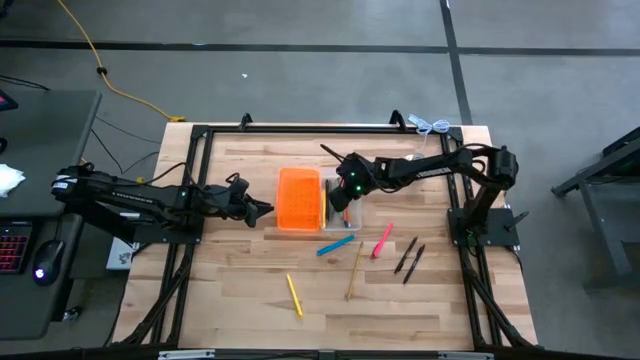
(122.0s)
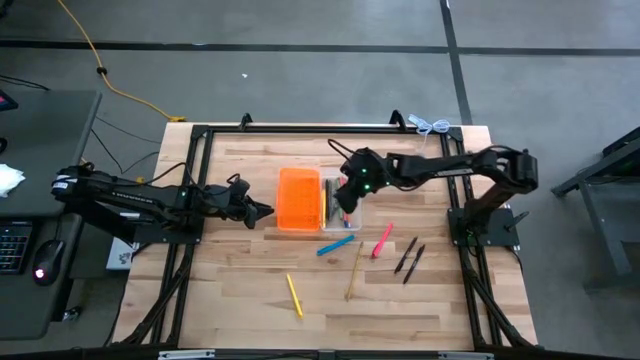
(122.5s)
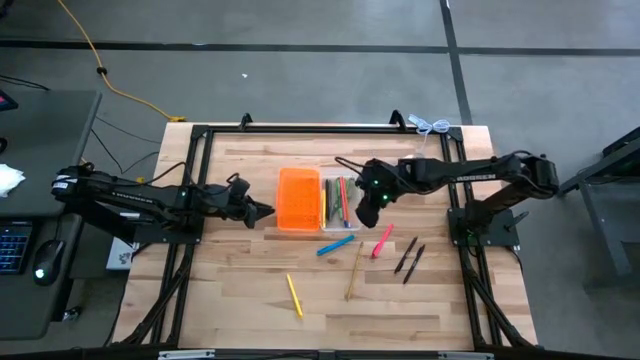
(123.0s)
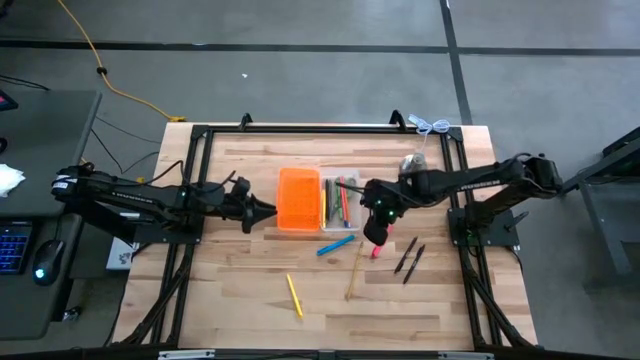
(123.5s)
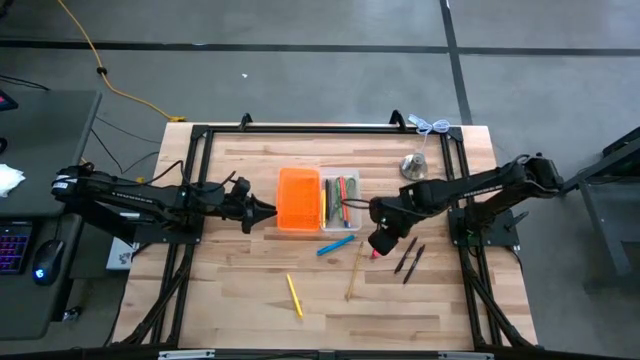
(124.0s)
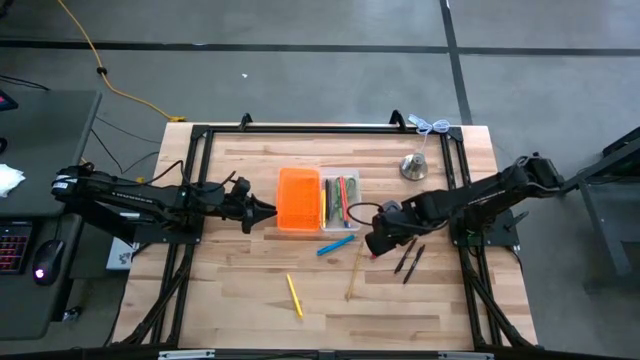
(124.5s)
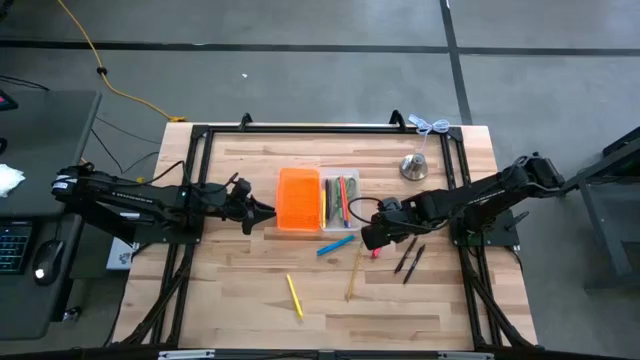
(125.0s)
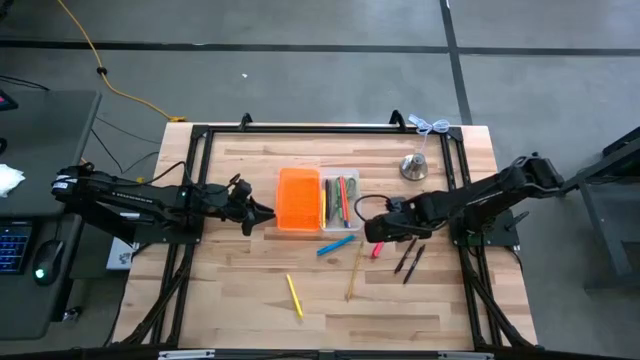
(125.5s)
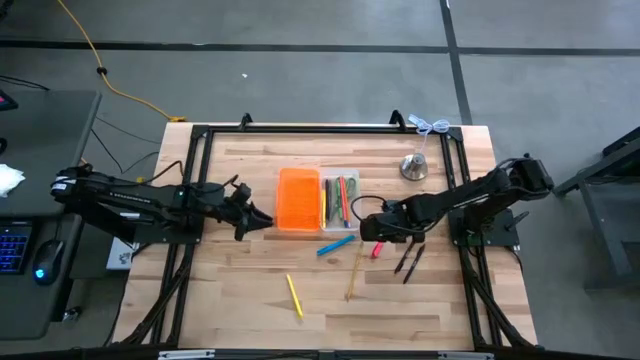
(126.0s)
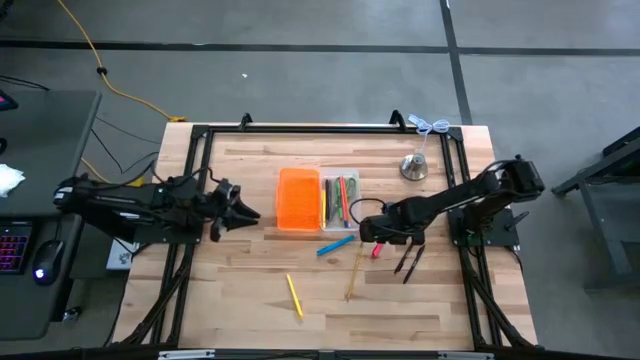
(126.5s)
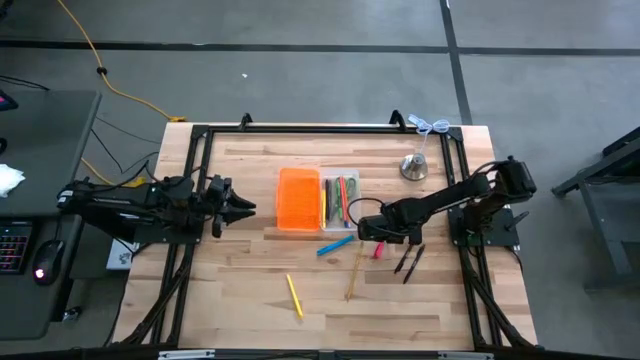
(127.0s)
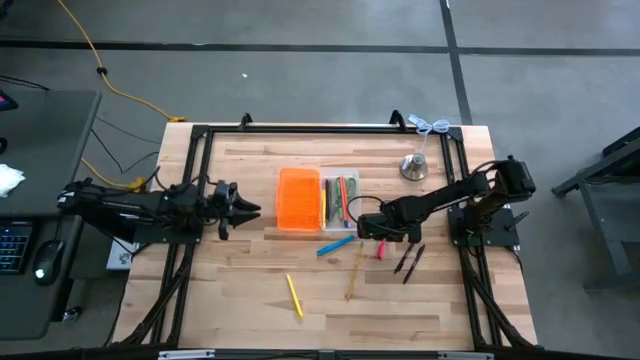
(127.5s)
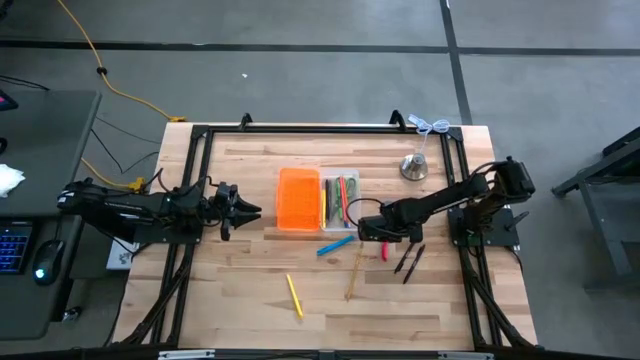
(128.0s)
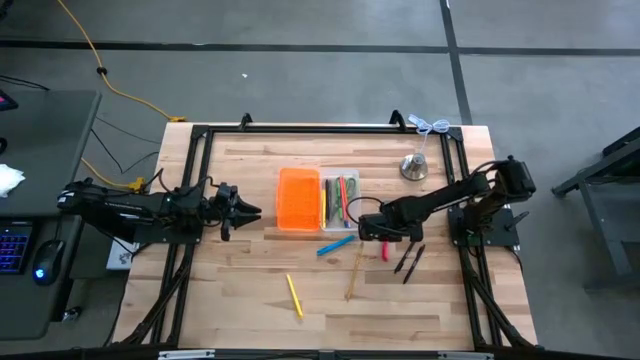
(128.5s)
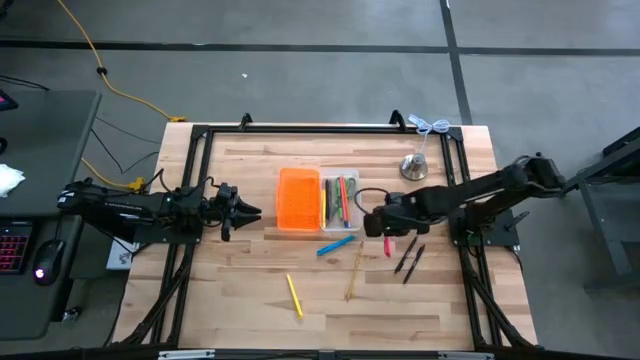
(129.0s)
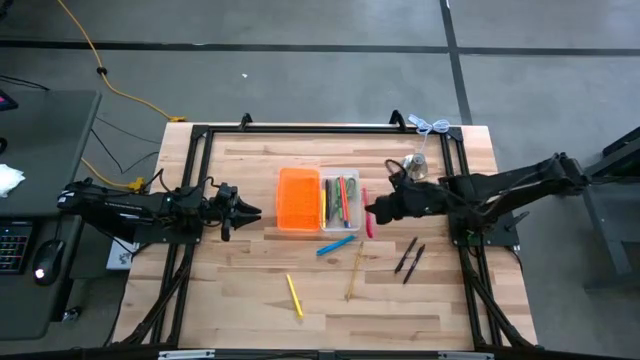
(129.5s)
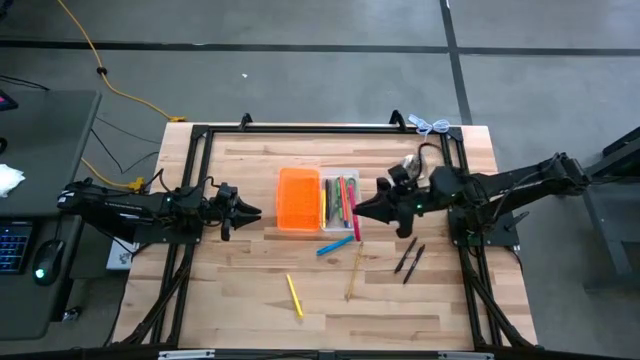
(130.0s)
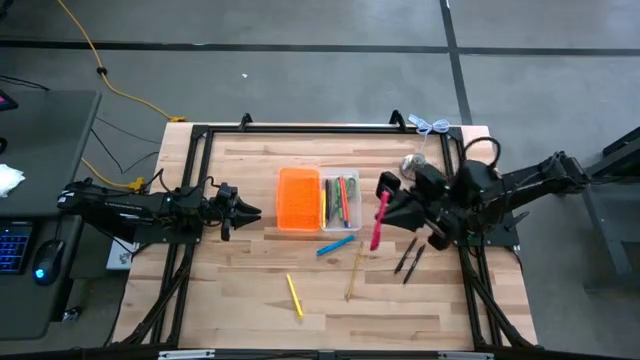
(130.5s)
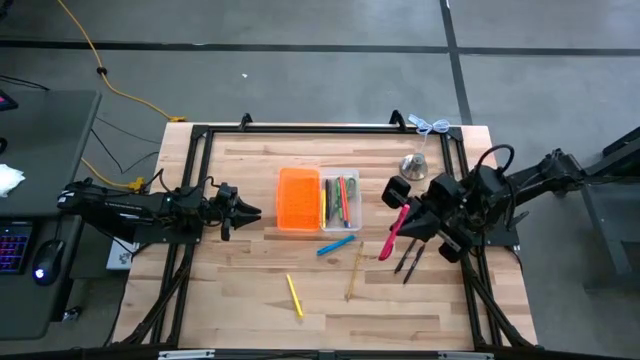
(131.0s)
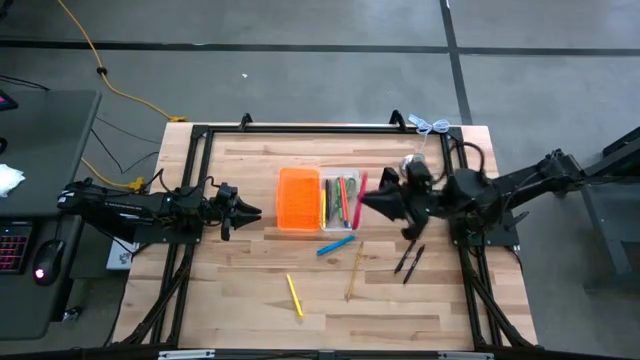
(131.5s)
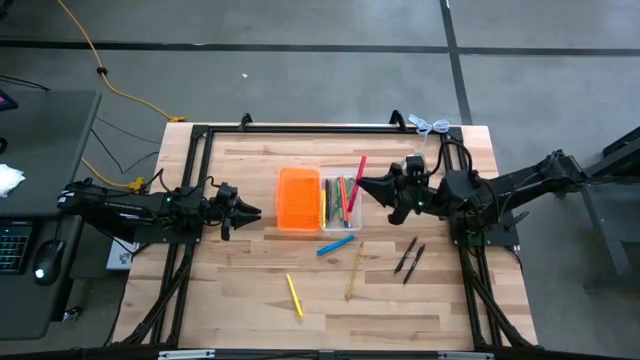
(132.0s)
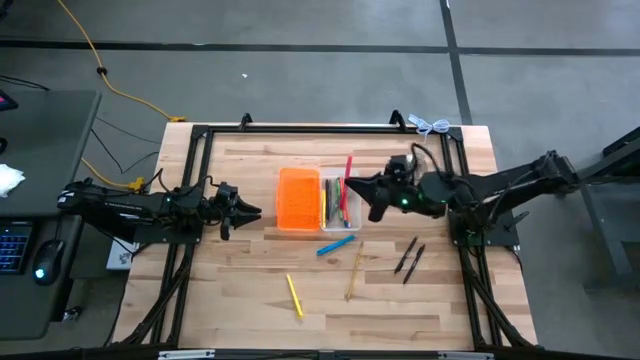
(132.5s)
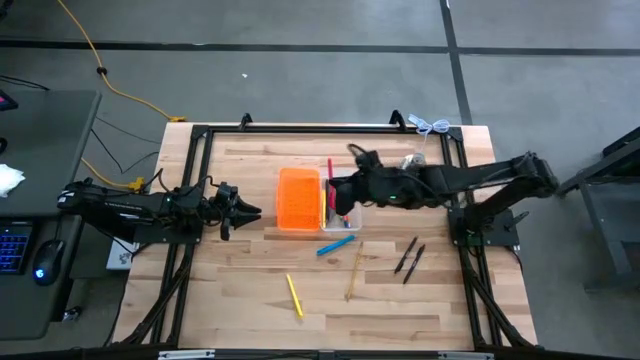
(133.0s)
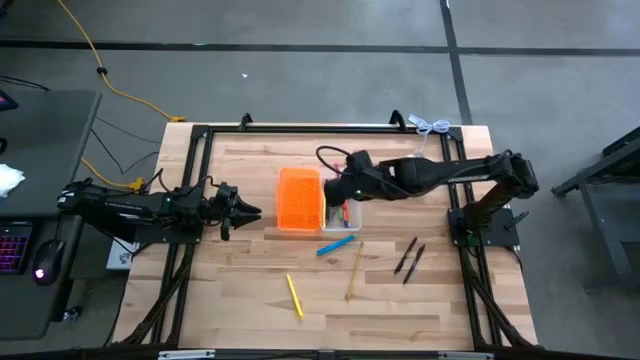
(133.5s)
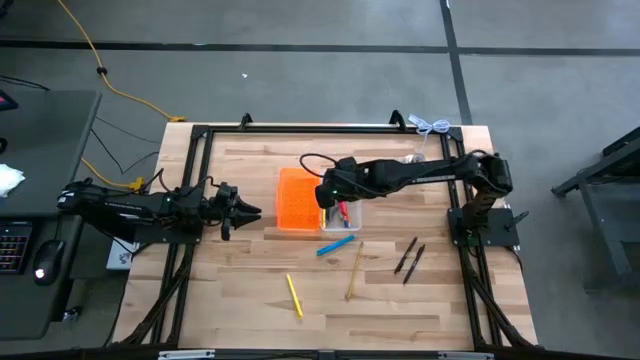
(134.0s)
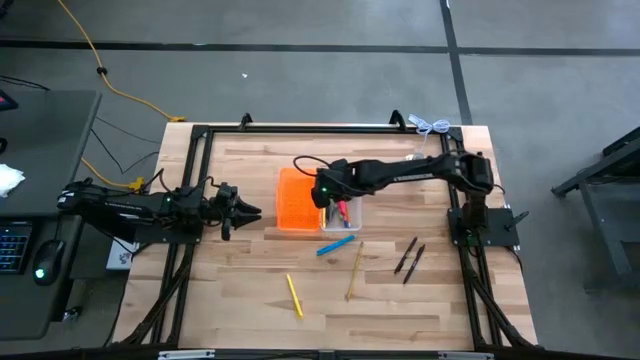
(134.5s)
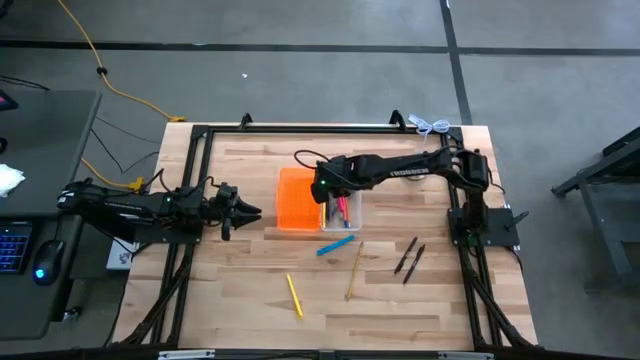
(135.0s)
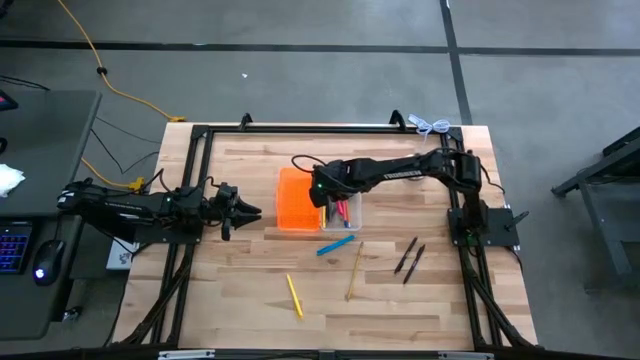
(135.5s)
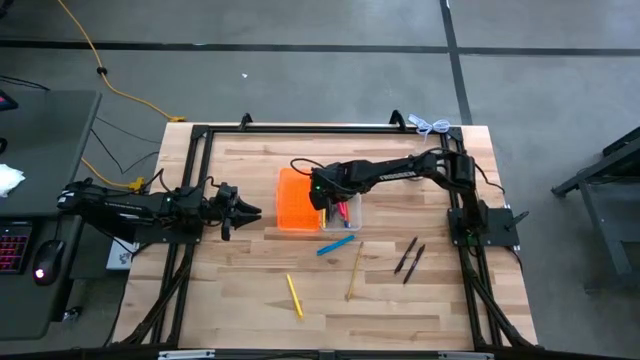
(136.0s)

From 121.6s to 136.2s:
Task: Pick & place school supplies into a supply box
Put the pink pen into the supply box

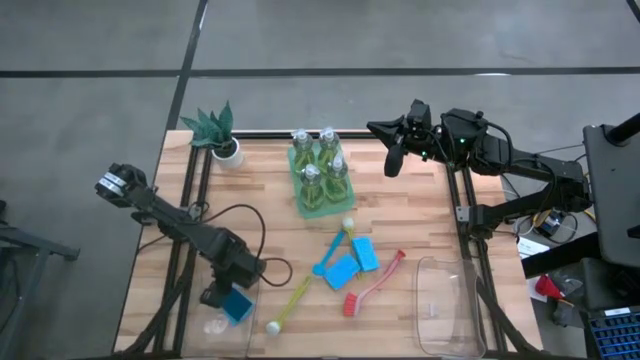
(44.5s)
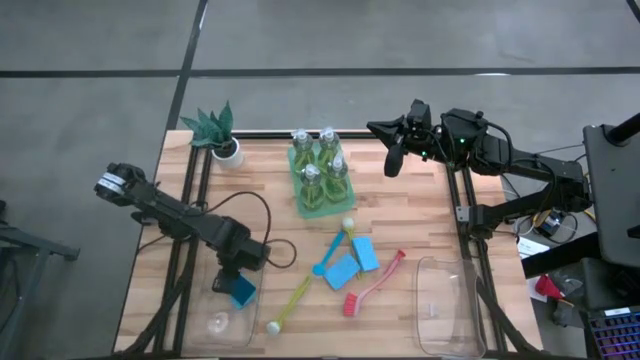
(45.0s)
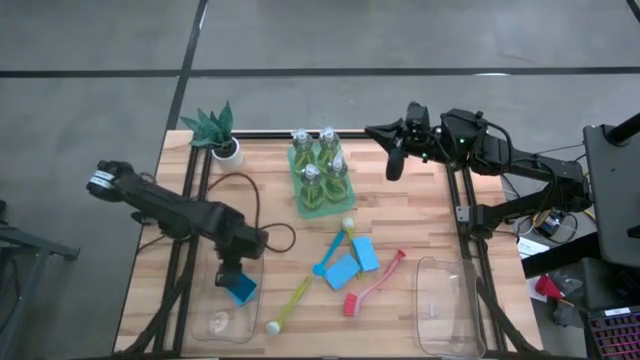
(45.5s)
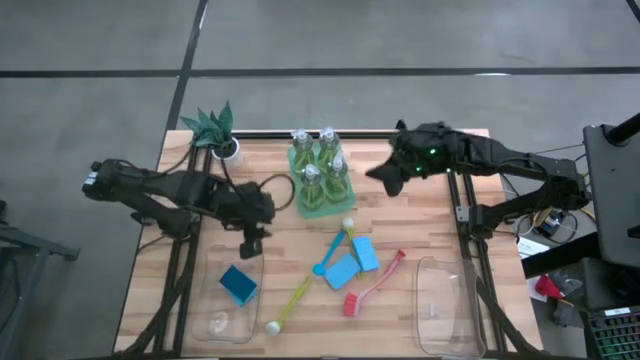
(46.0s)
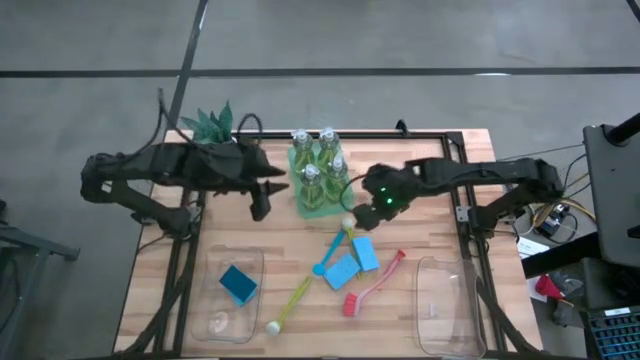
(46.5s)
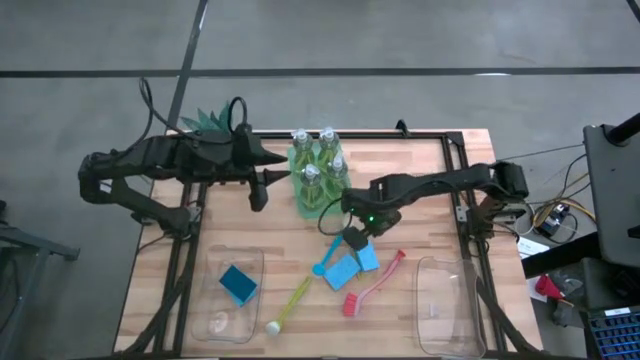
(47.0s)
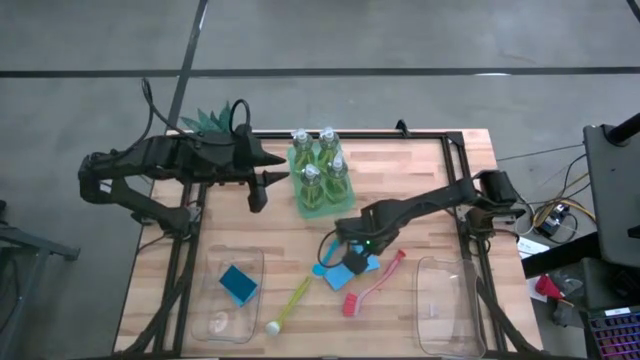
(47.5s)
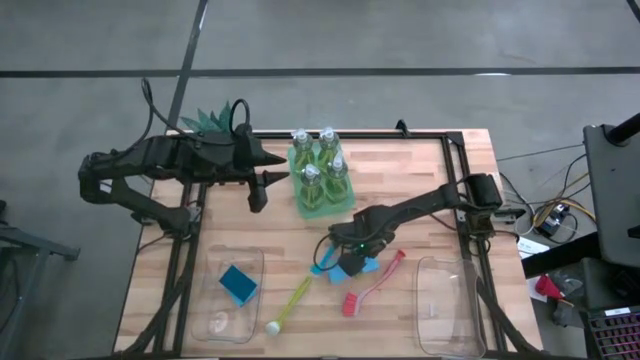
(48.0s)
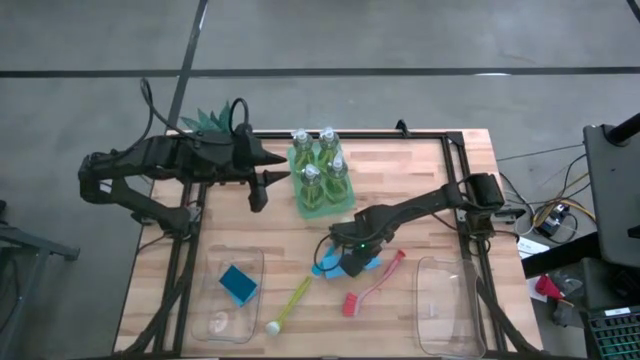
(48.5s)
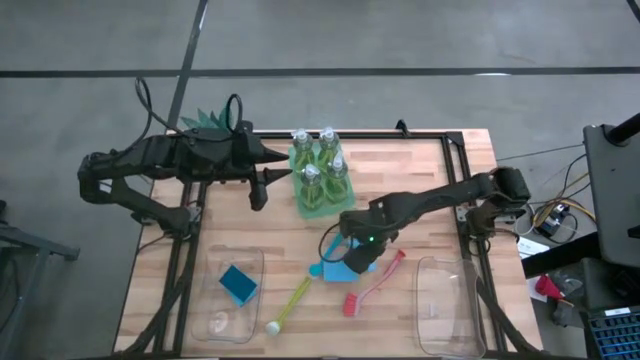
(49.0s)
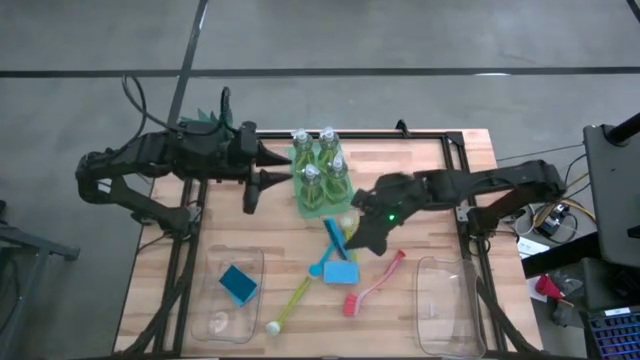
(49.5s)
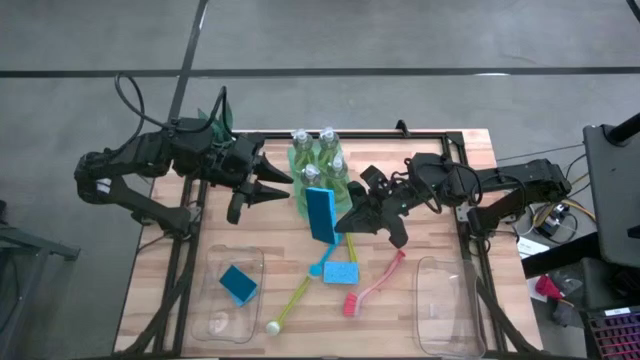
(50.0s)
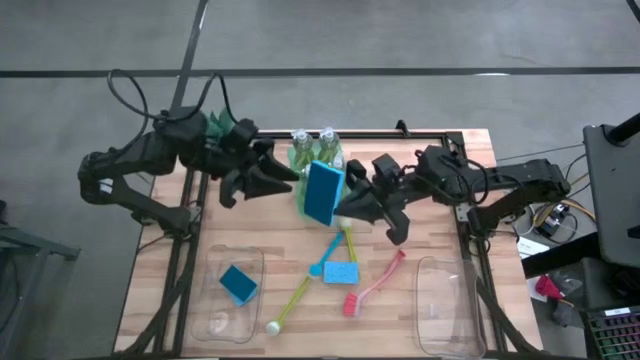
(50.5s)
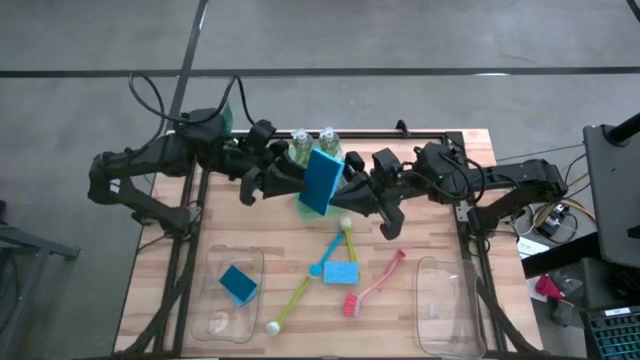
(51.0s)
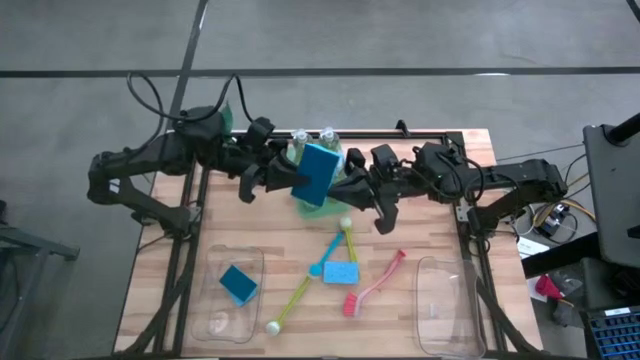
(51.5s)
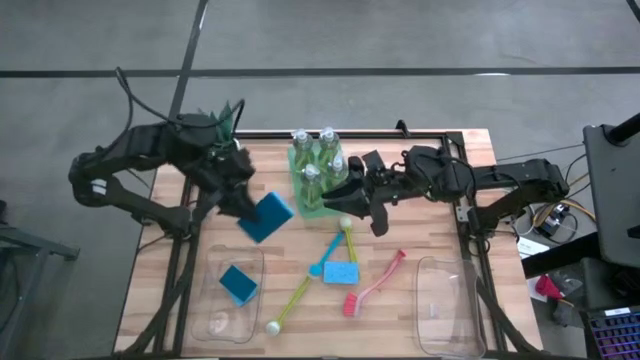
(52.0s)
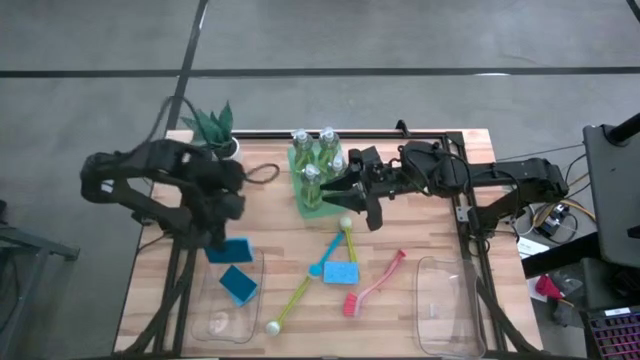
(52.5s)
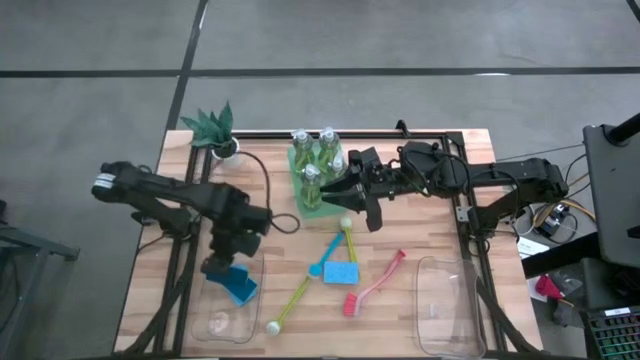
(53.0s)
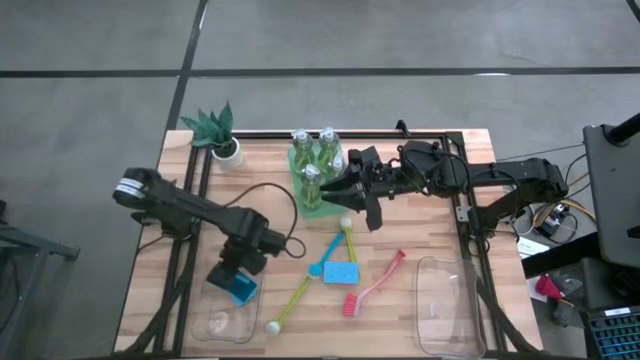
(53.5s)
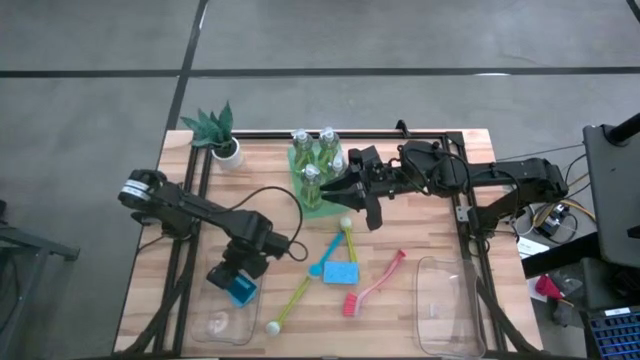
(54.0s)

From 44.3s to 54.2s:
Task: Pick & Place Kitchen Sink Supplies
Put the blue sponge to the left transparent bin
